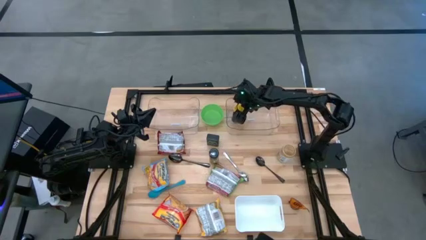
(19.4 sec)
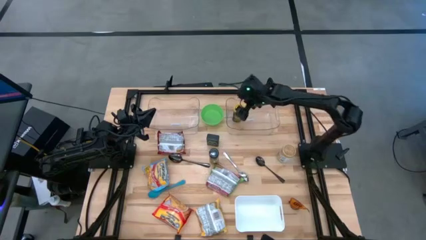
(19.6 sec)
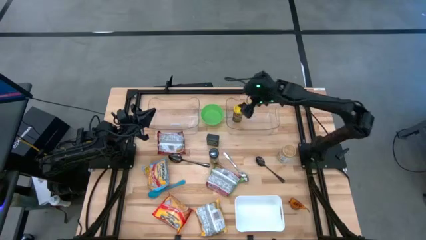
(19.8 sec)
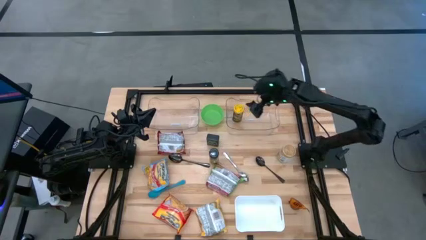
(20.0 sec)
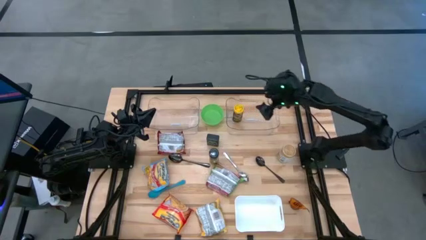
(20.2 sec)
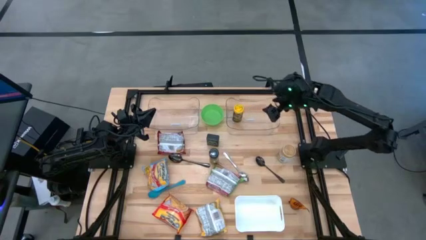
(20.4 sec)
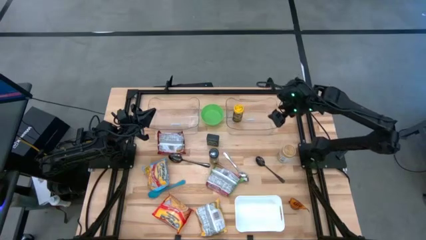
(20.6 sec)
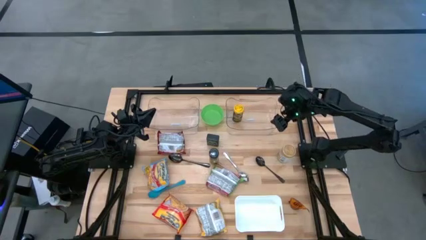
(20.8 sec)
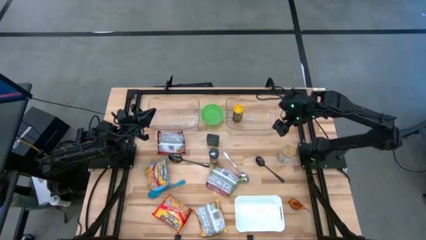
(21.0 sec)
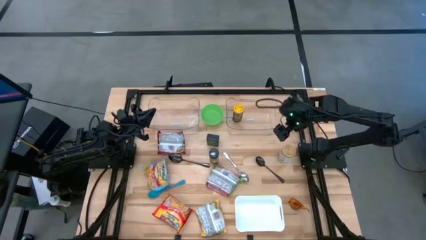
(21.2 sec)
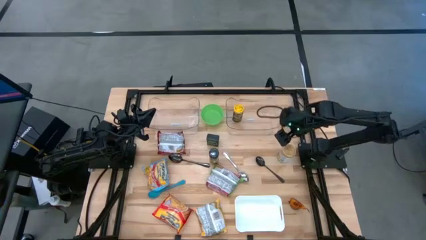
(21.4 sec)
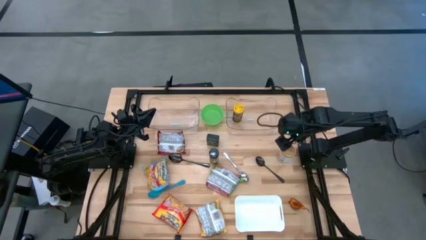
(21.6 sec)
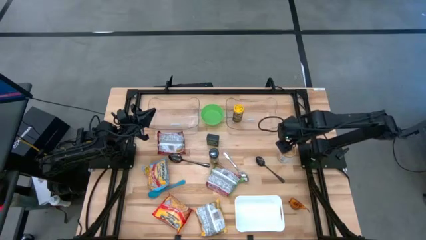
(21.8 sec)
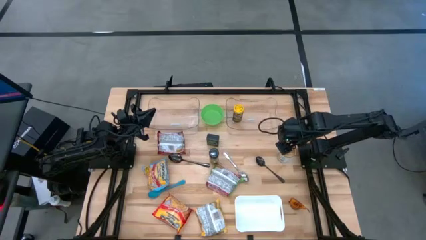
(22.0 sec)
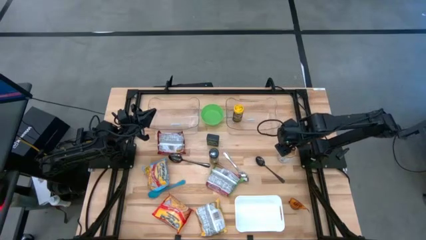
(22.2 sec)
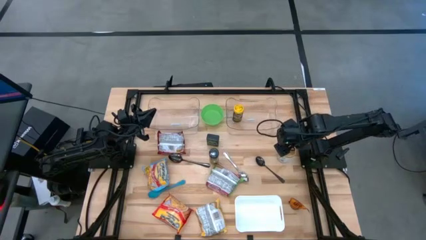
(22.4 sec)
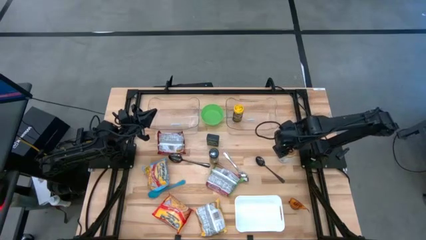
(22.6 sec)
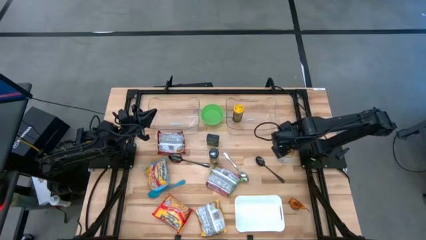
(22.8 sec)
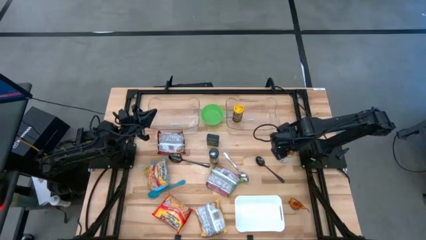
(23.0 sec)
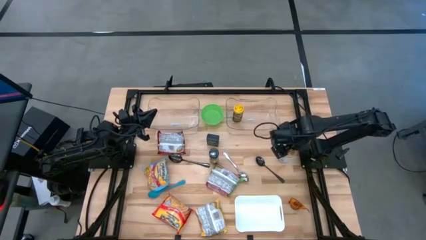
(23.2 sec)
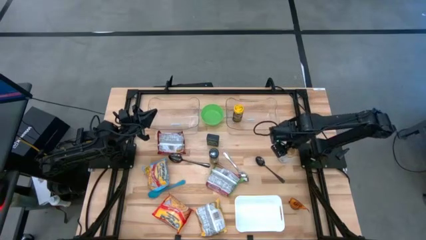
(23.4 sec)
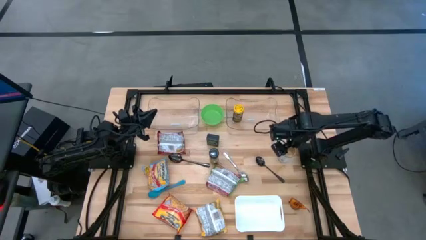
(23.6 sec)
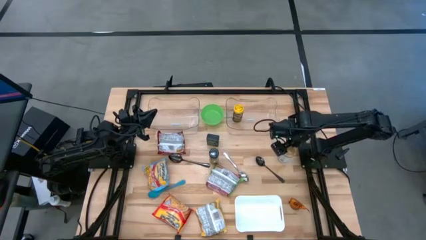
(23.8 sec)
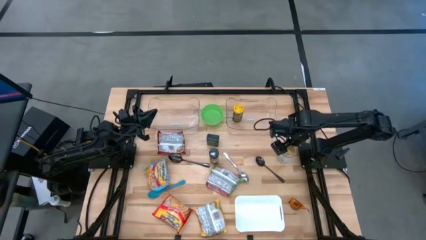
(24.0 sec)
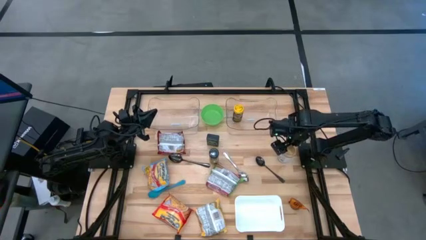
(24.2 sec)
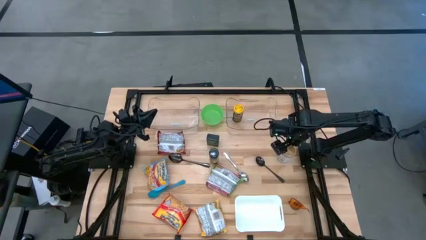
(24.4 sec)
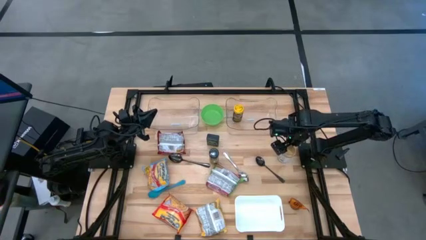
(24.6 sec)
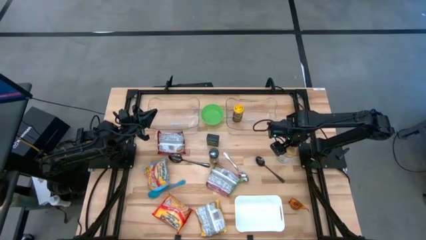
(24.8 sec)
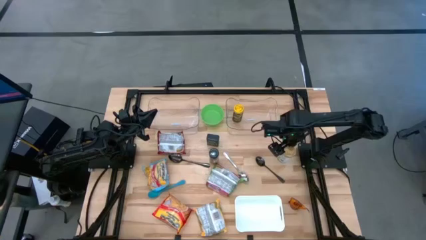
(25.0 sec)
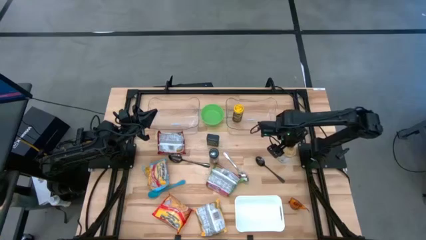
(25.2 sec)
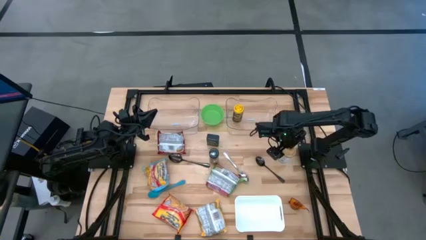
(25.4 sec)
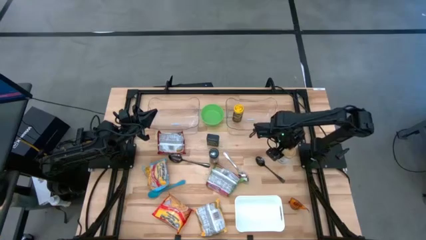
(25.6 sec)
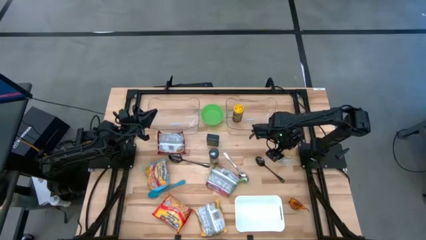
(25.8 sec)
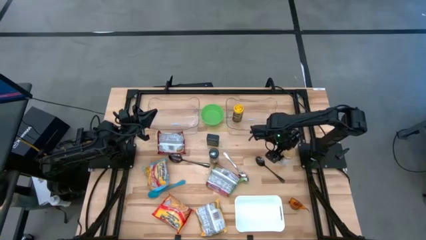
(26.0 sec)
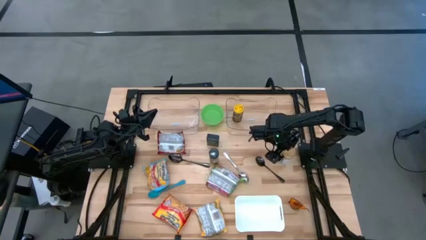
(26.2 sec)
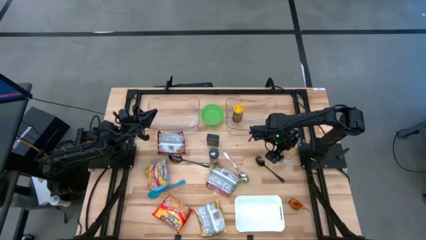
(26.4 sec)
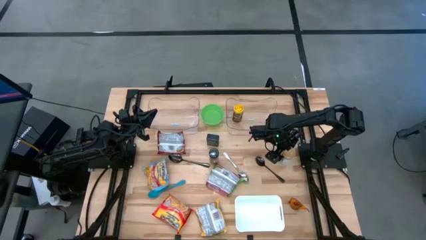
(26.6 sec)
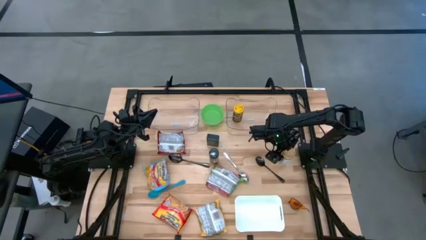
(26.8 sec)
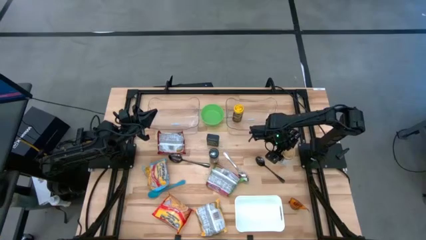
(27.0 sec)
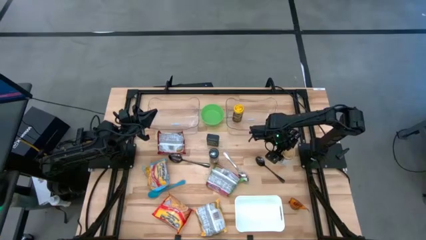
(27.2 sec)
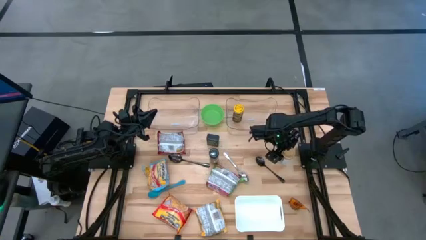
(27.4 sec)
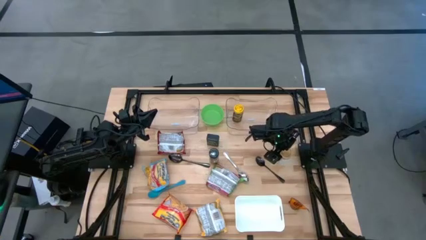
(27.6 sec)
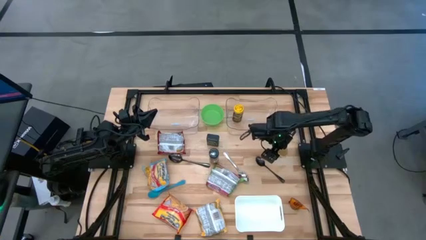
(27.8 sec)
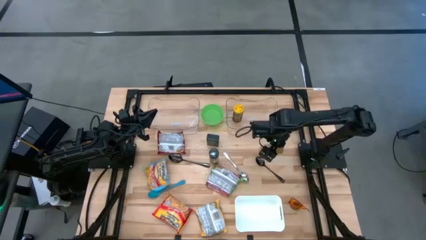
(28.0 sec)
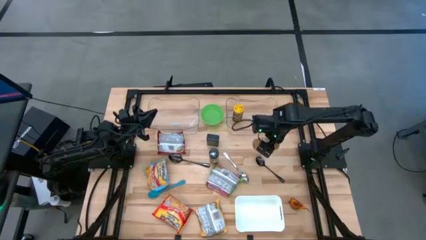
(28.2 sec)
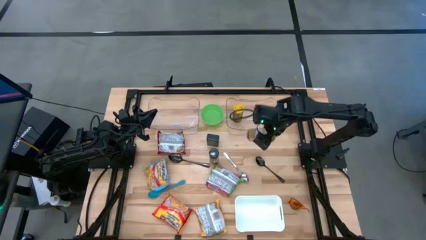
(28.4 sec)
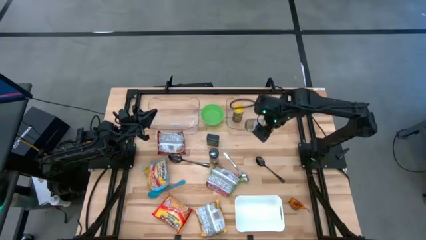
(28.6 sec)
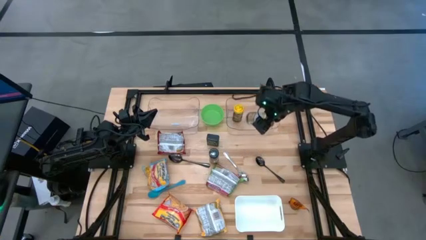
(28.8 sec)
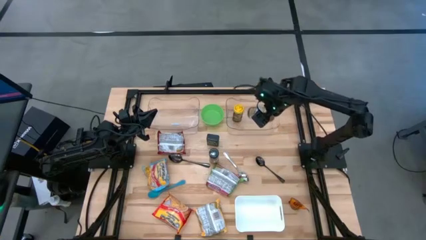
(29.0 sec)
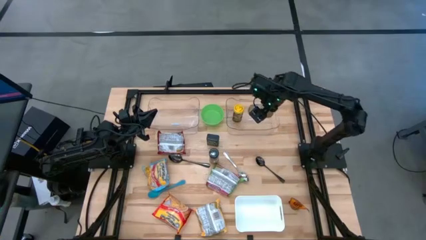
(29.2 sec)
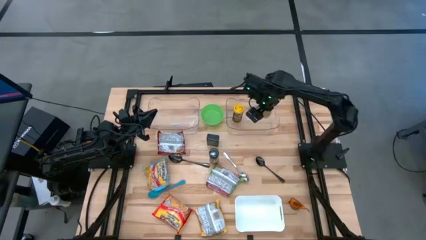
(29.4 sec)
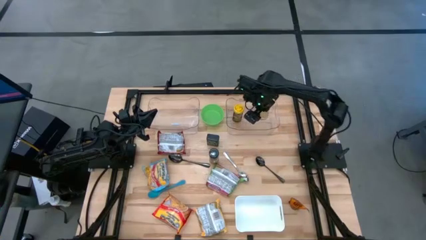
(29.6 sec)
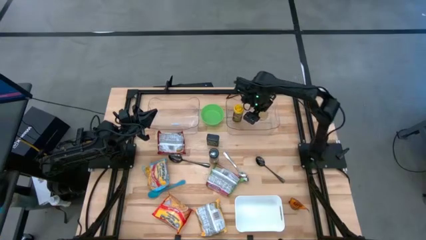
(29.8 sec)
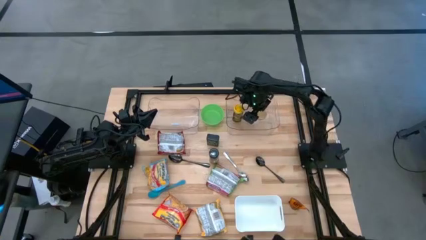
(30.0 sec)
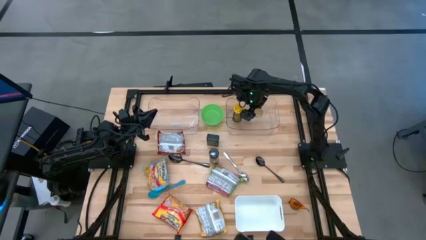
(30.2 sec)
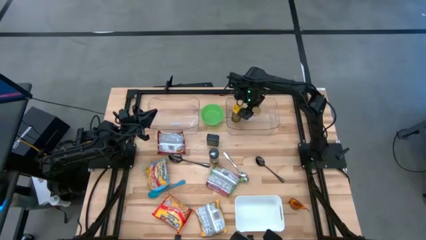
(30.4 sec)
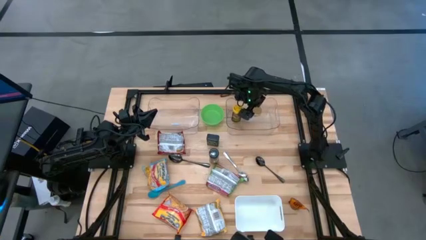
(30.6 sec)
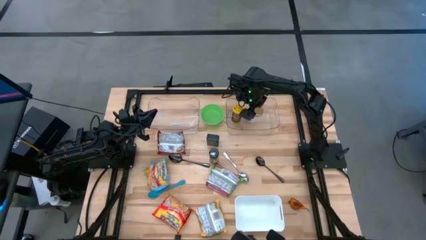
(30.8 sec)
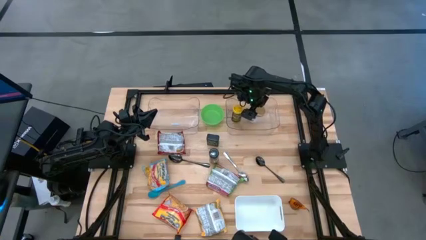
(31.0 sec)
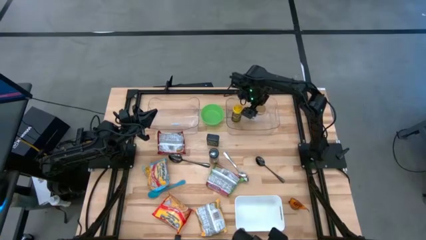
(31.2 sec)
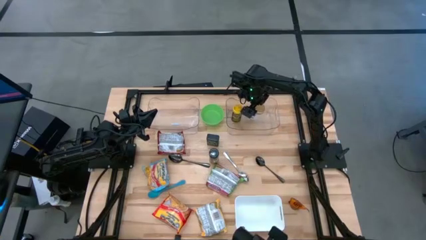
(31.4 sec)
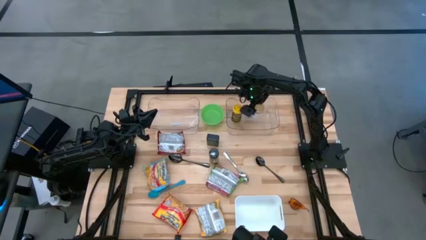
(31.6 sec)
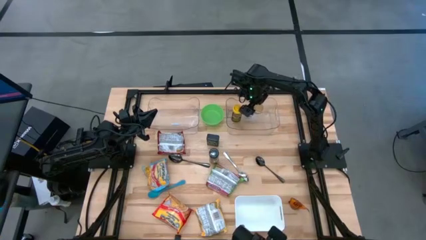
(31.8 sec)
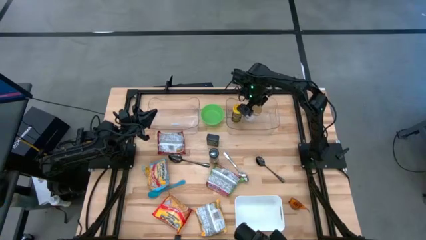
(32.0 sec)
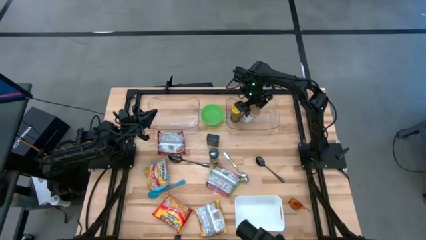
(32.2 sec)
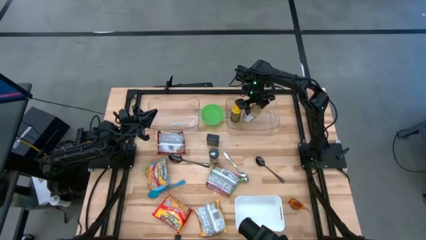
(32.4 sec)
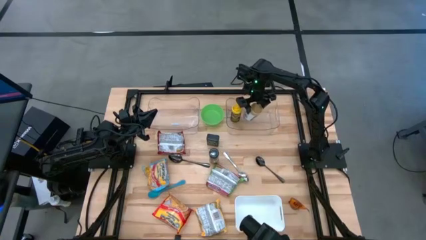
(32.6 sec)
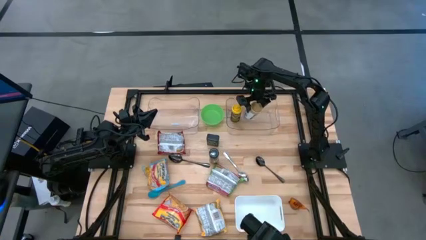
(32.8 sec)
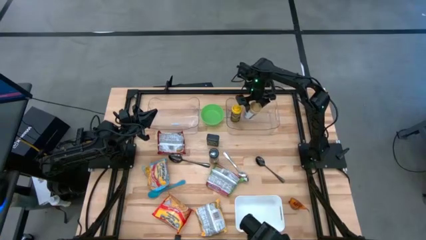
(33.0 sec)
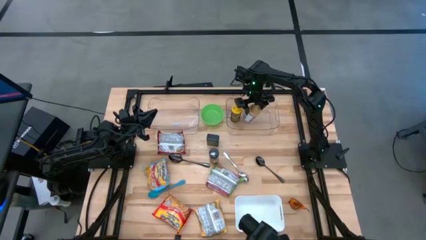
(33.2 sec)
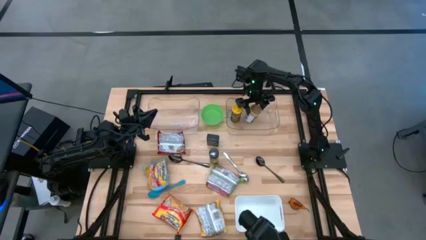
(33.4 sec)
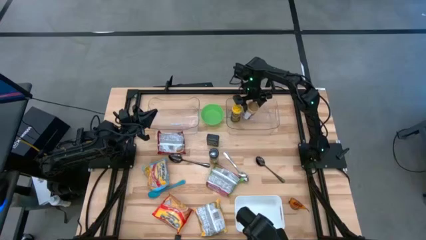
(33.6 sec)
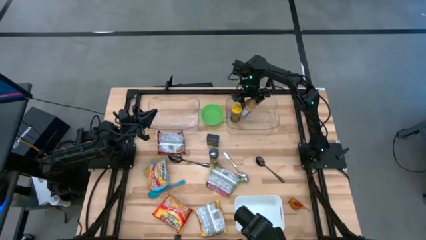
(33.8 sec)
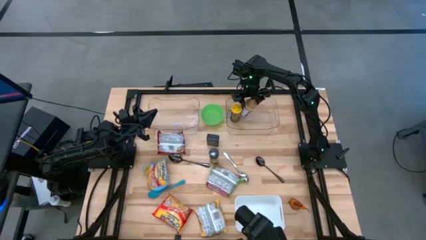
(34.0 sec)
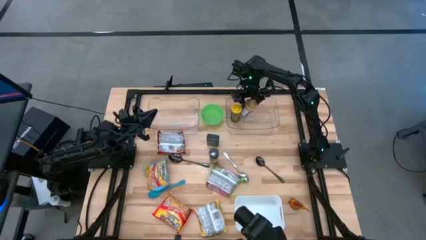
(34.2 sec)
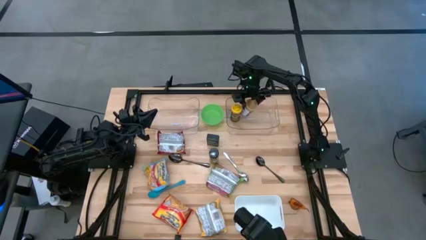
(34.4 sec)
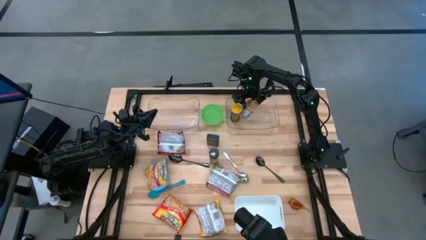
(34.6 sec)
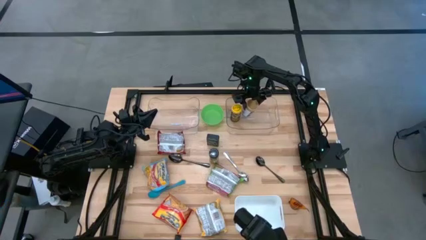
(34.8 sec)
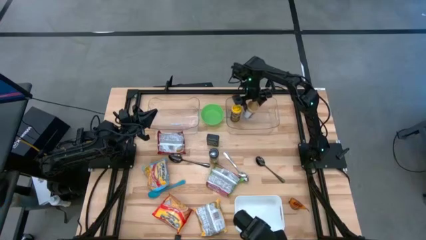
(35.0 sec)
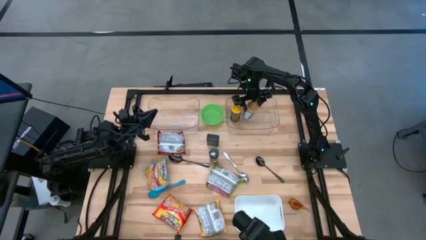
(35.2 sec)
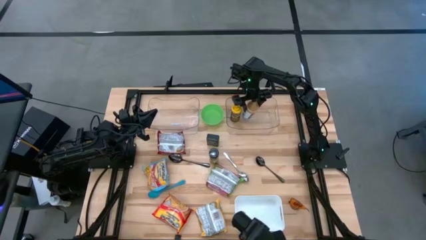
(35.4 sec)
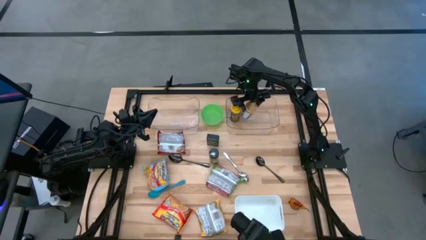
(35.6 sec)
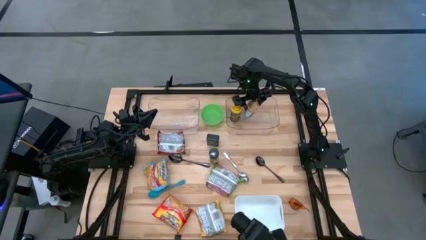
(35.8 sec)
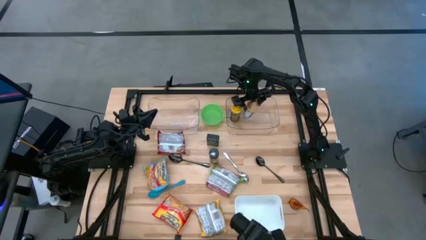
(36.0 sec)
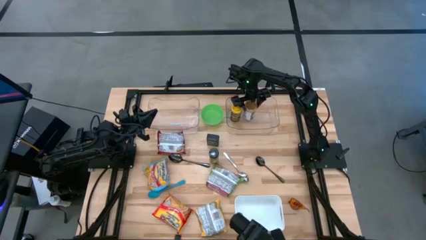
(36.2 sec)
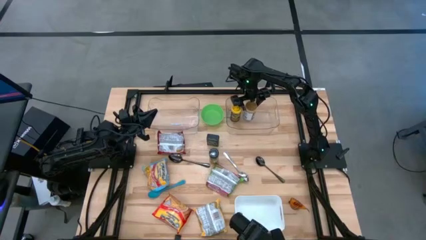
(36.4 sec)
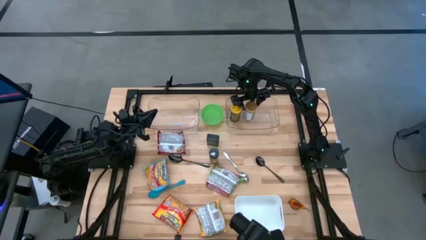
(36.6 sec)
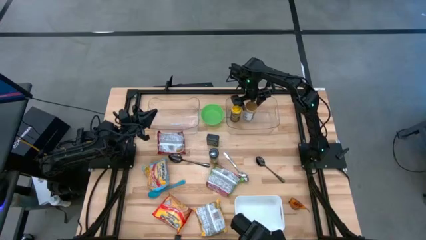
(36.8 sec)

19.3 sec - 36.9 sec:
Task: Pick & Place Food Item
Put the spice bottle in the right transparent bin
